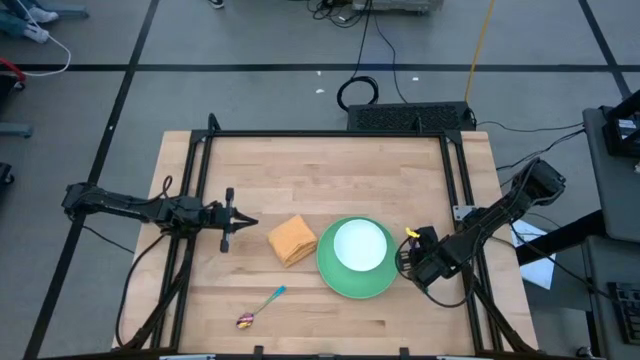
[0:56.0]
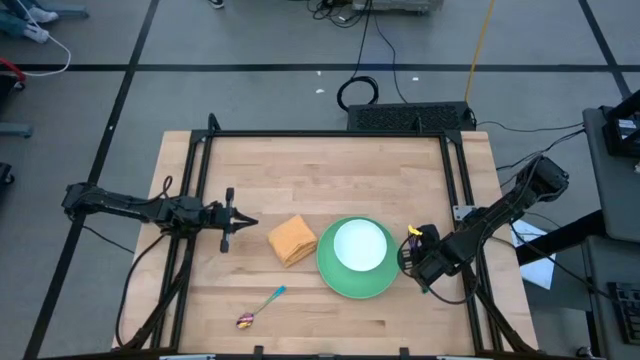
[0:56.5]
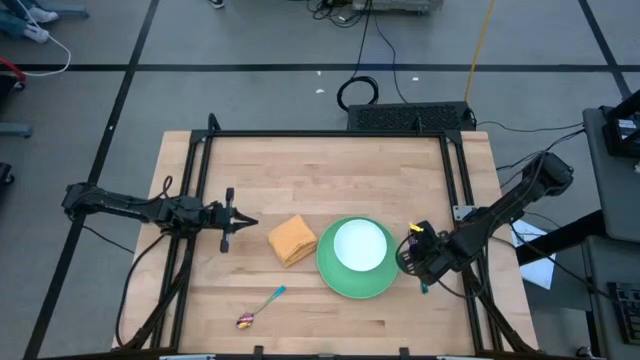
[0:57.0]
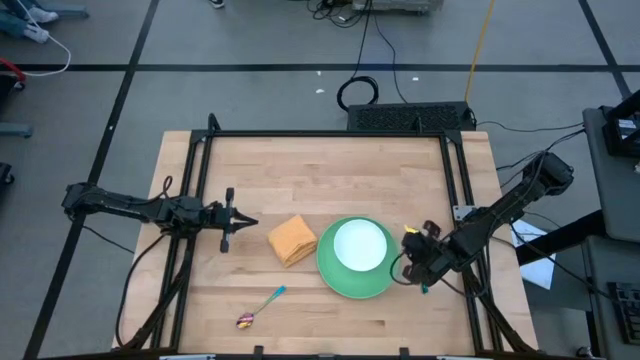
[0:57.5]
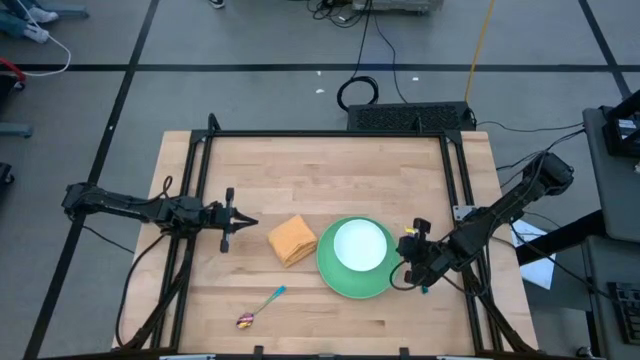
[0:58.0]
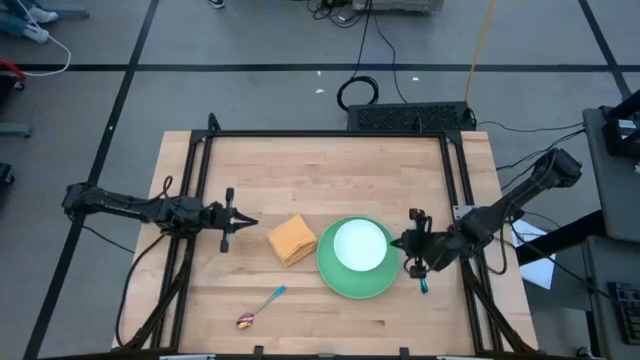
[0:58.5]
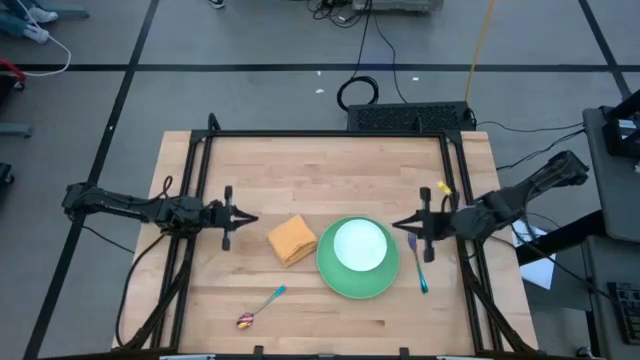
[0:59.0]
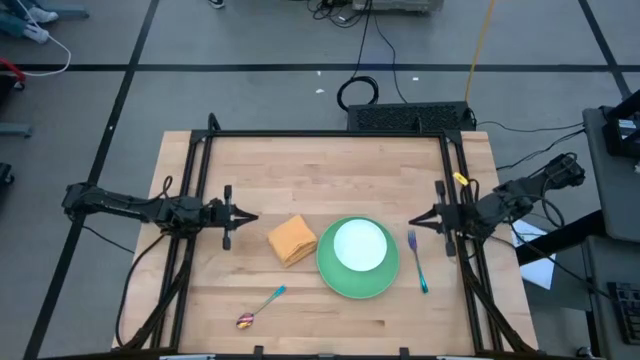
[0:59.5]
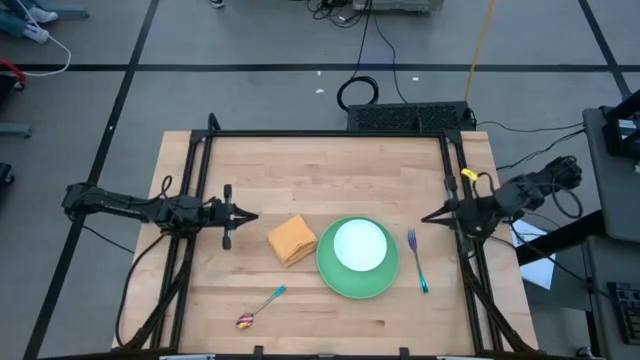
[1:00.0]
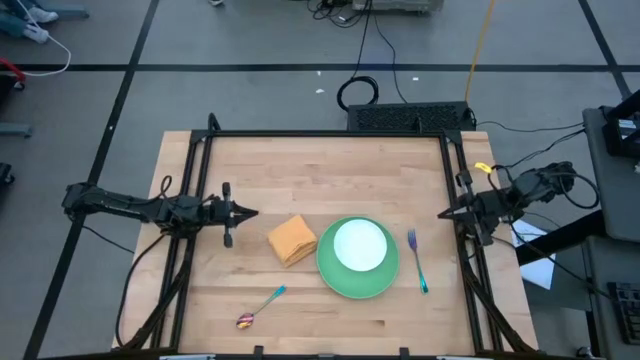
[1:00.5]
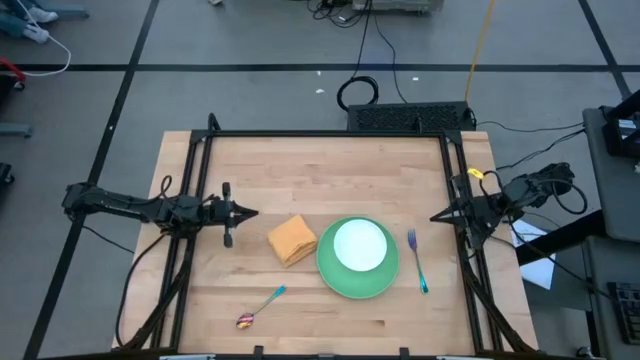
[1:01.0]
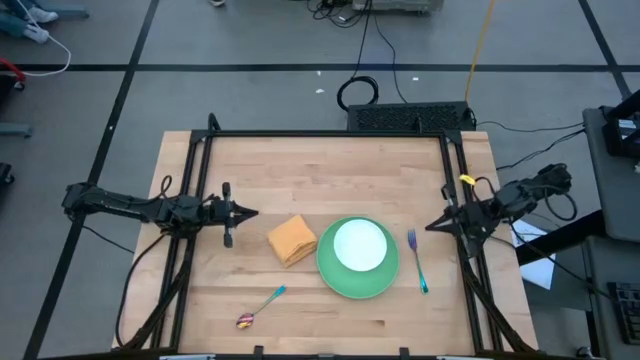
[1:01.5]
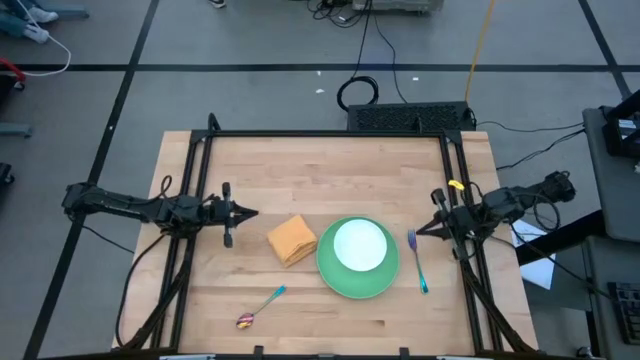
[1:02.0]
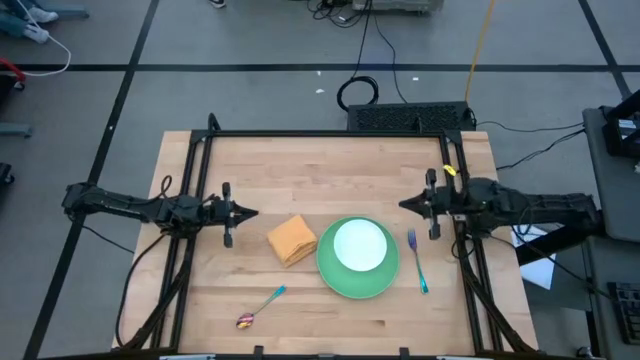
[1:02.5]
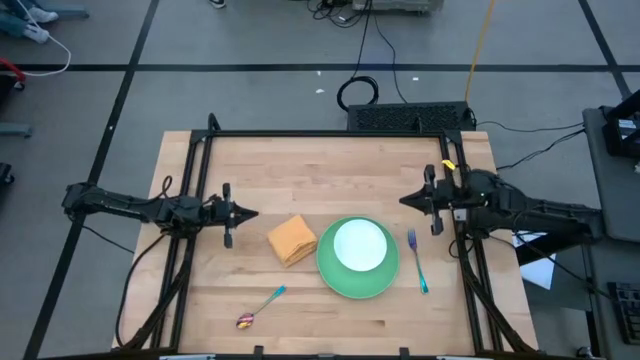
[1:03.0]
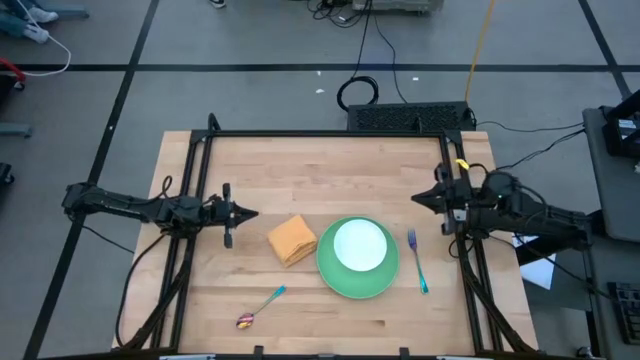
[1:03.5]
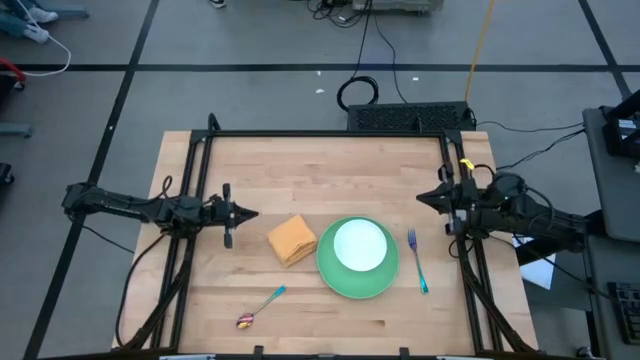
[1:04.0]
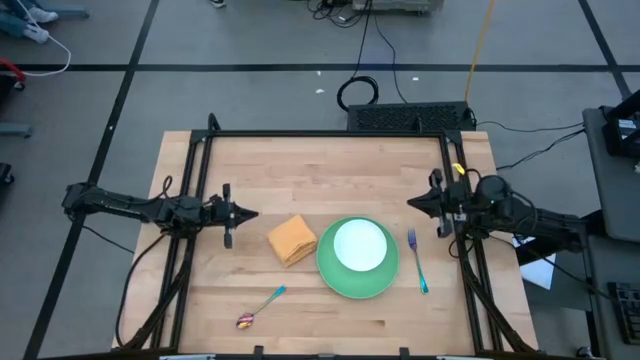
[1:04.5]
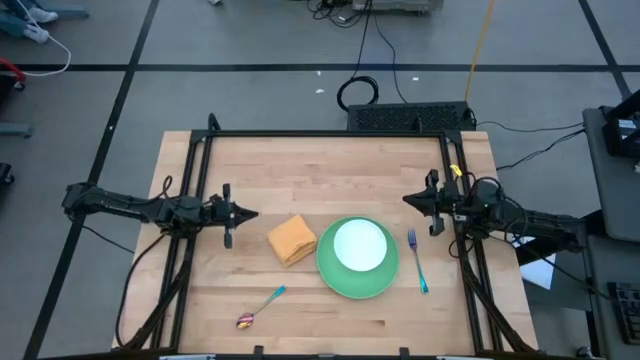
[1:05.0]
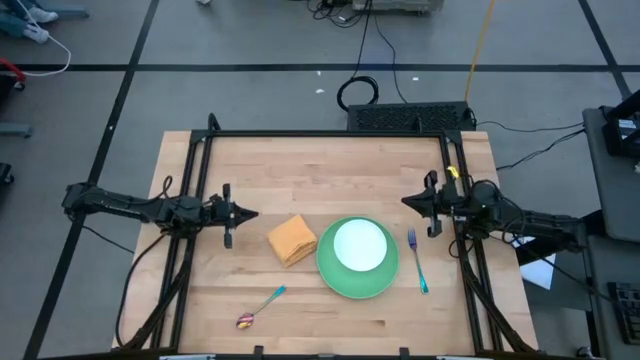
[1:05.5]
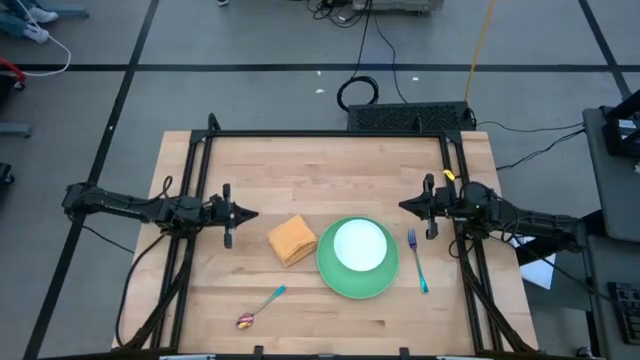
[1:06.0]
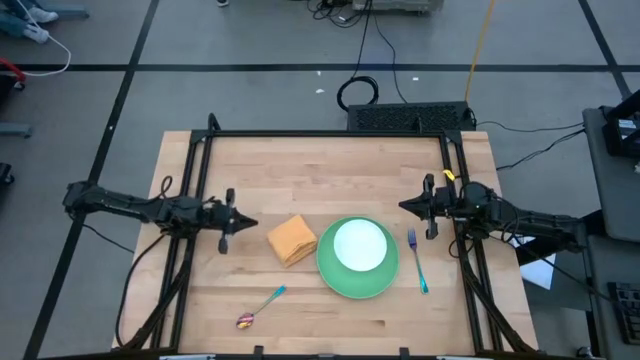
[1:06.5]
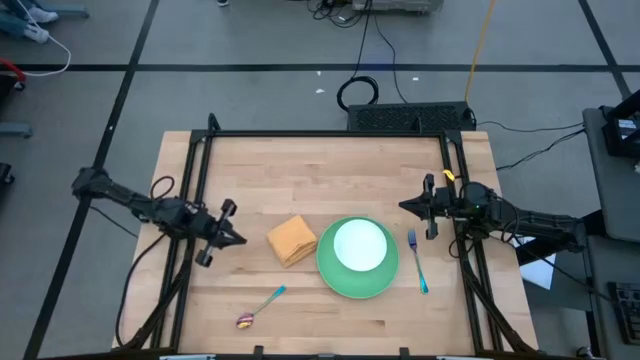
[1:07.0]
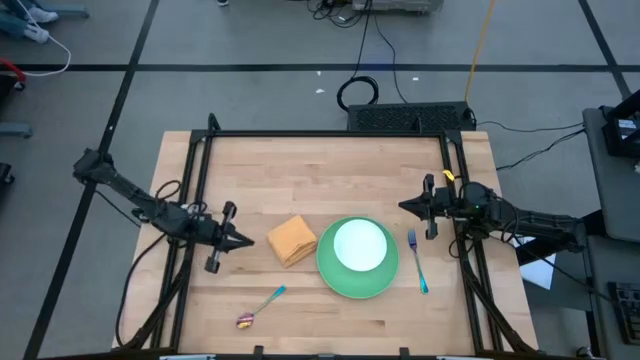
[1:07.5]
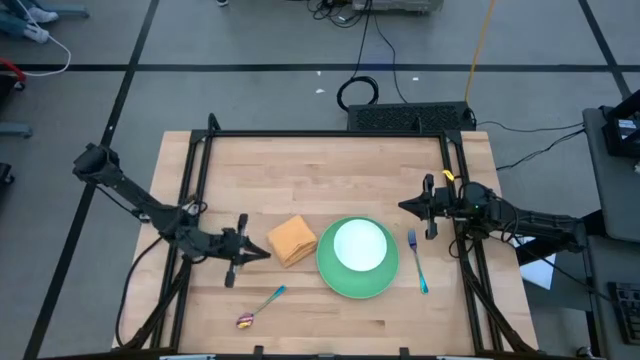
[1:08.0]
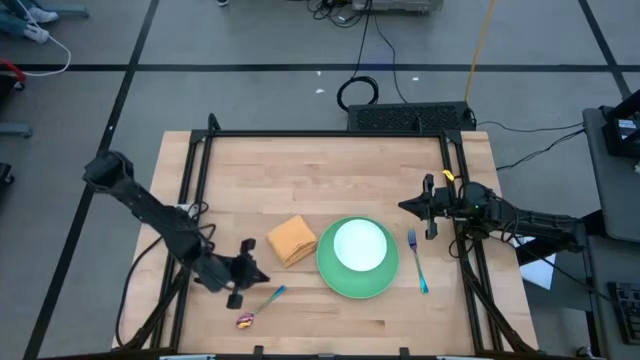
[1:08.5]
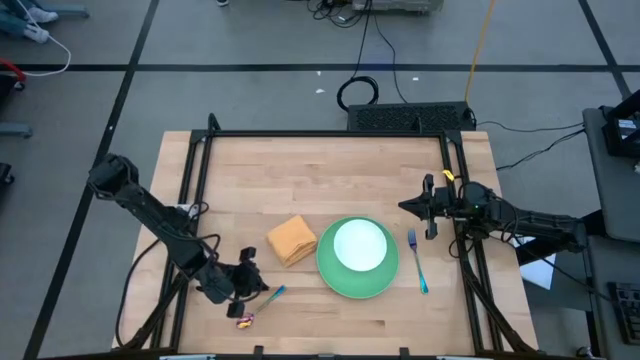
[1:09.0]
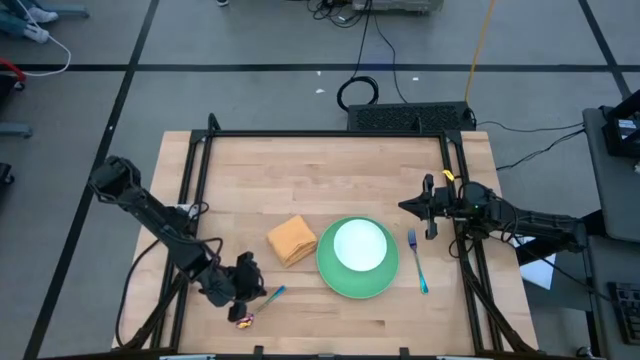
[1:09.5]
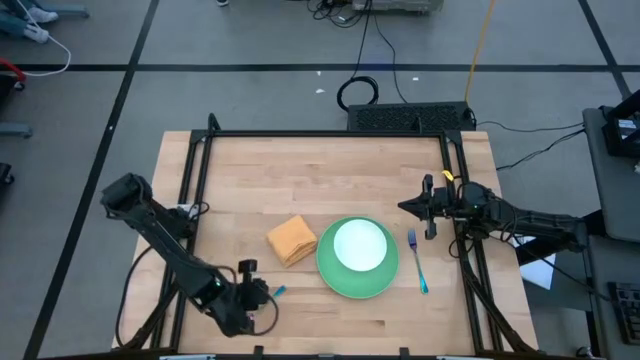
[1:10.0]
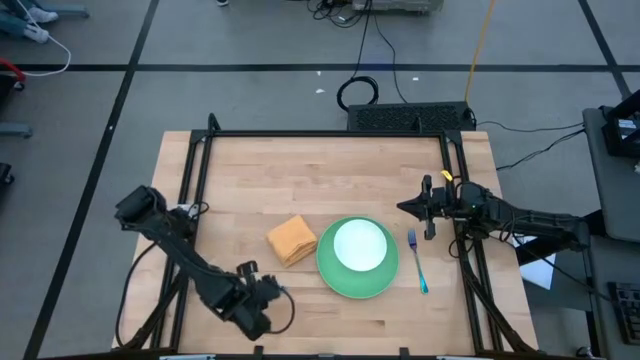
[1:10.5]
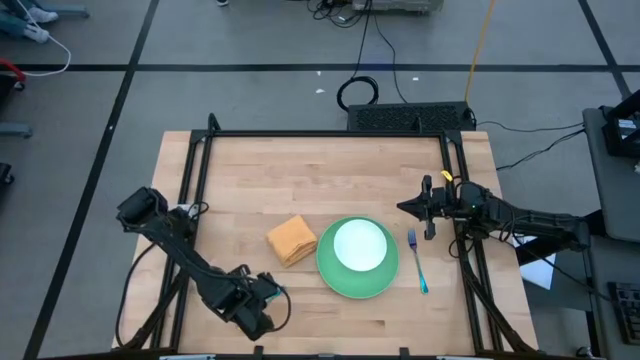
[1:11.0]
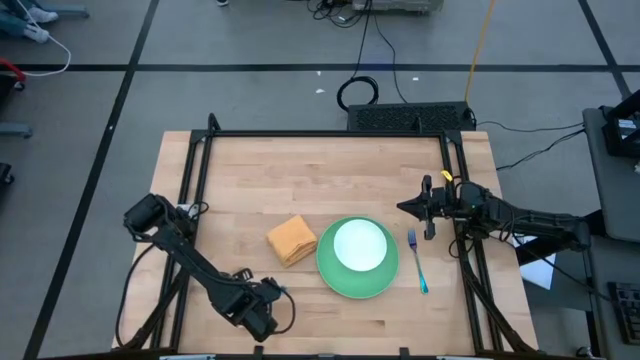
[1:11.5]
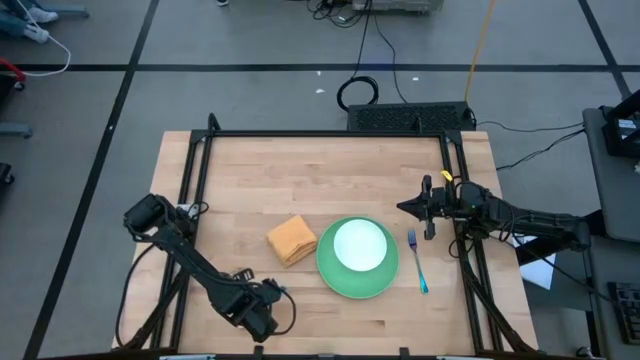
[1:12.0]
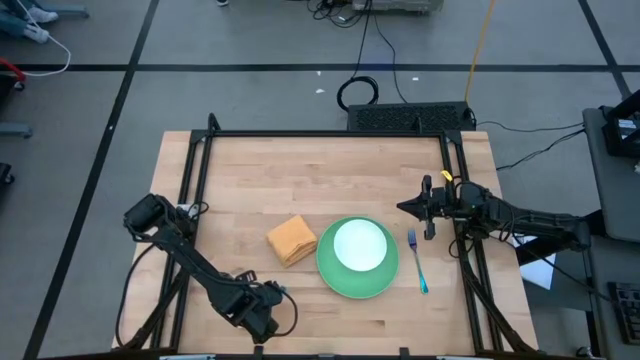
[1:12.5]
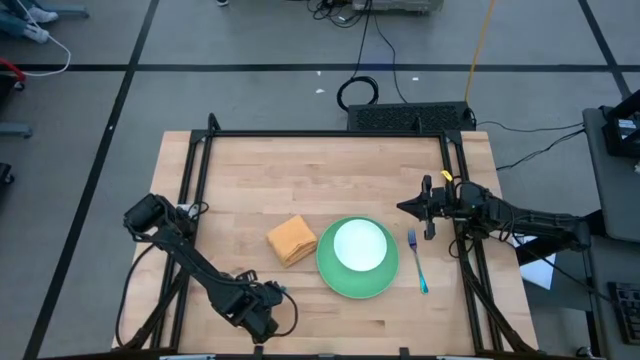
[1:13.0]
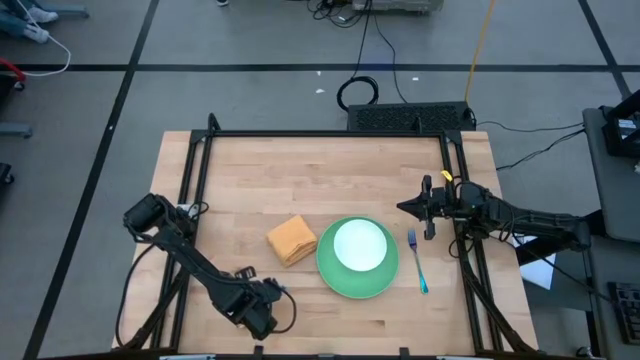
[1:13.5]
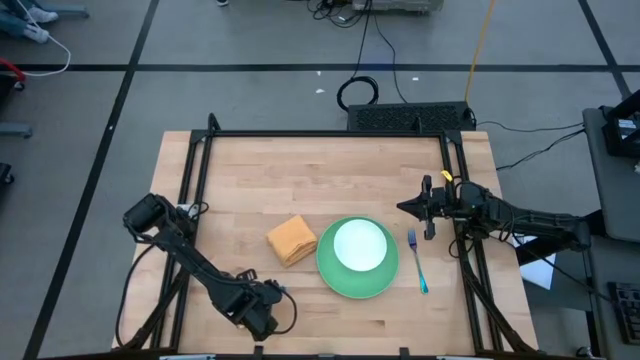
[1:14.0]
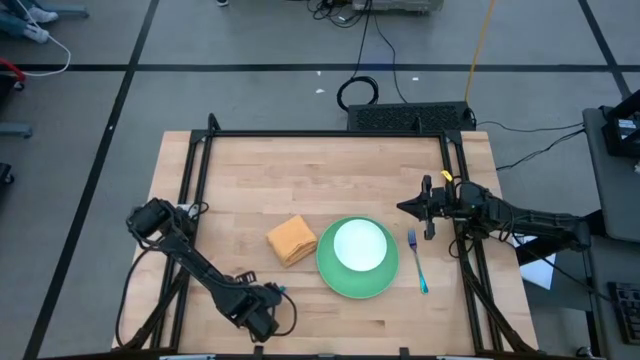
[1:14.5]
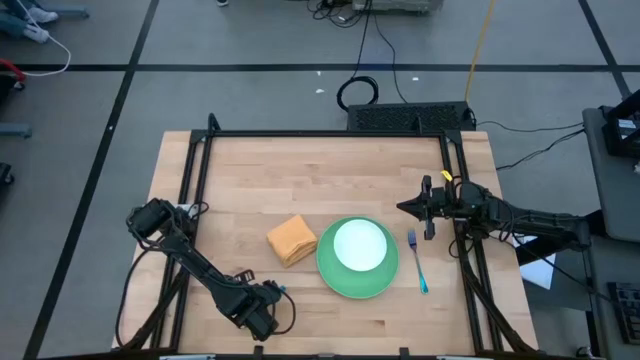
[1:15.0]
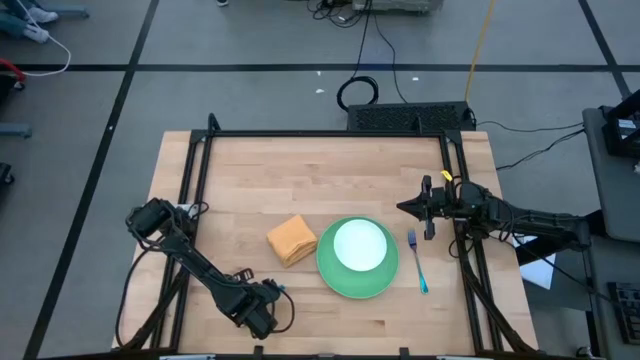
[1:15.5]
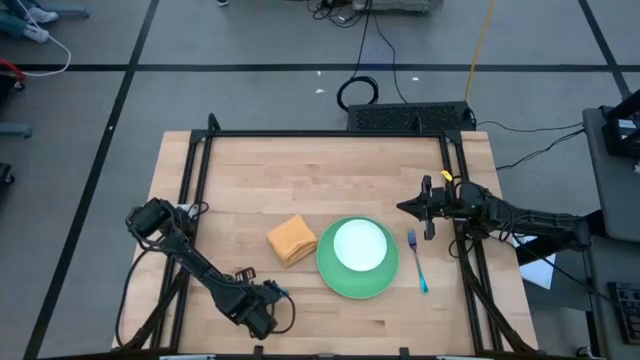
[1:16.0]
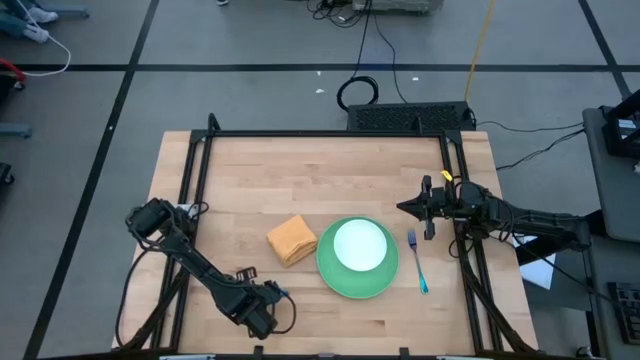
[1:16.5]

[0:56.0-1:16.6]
Task: Set table place
Put the purple spoon into the white bowl

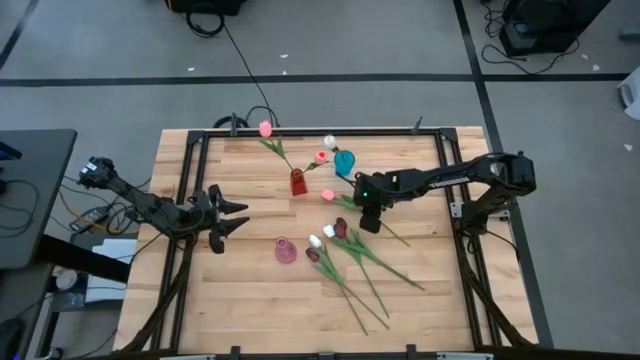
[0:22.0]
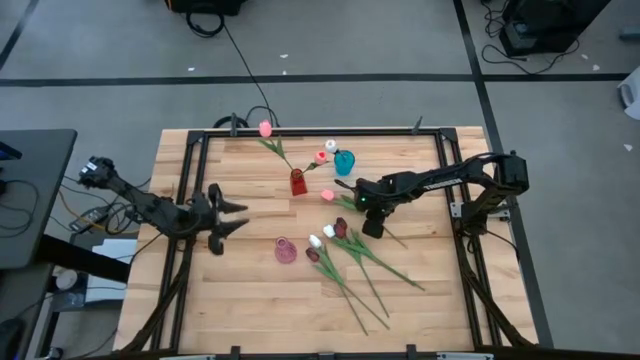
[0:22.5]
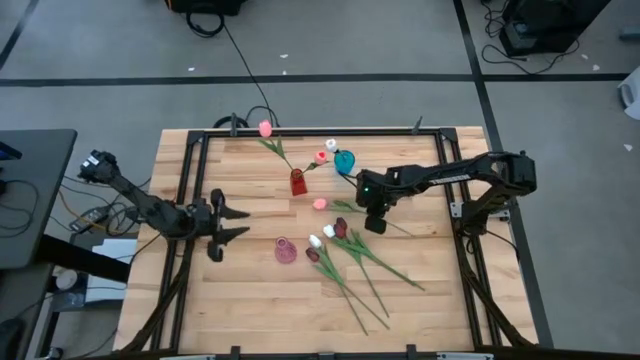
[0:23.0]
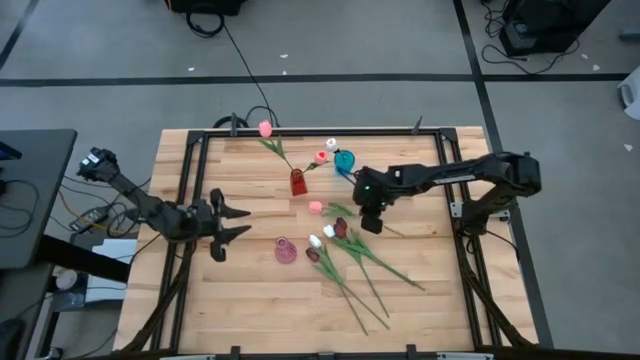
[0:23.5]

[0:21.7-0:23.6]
Task: Sort flowers into vase by color
Put the pink flower into the red vase
